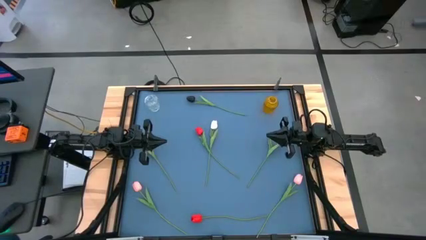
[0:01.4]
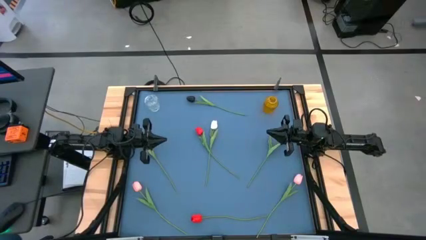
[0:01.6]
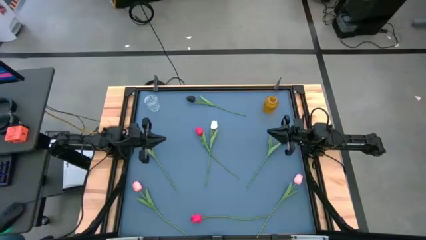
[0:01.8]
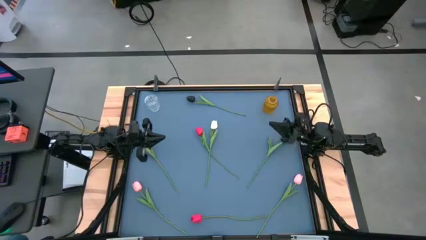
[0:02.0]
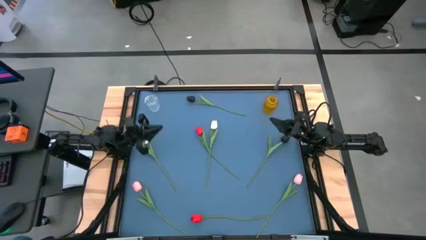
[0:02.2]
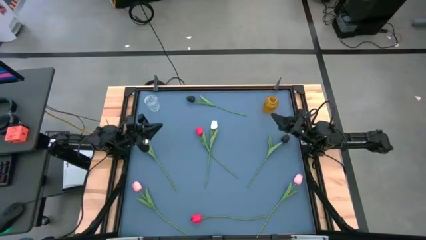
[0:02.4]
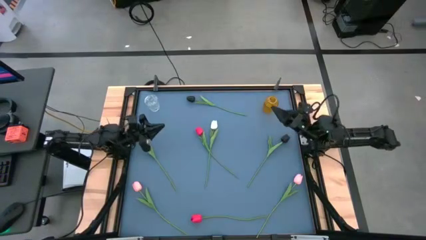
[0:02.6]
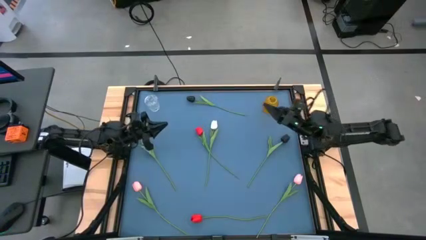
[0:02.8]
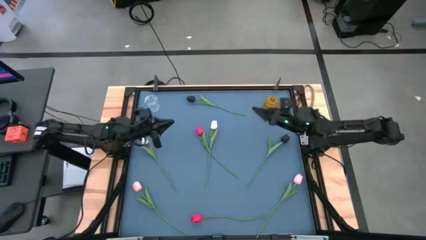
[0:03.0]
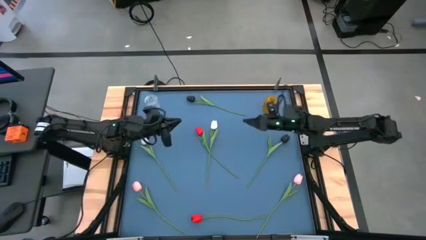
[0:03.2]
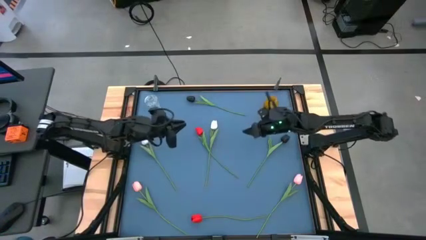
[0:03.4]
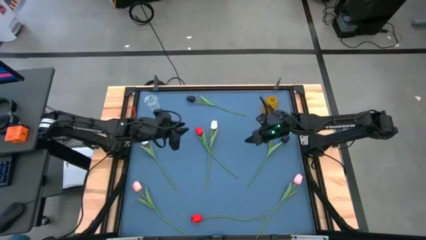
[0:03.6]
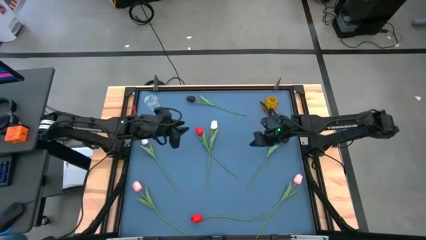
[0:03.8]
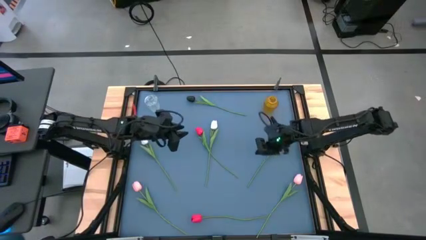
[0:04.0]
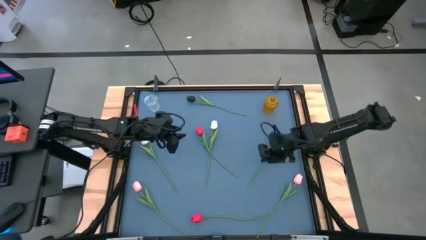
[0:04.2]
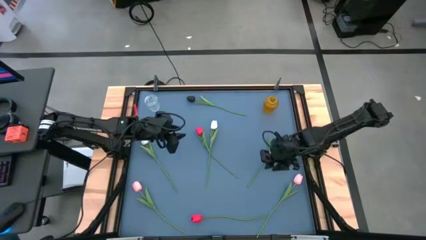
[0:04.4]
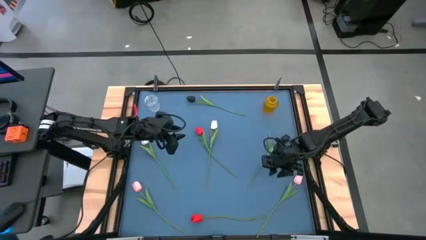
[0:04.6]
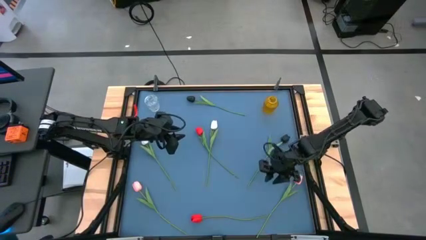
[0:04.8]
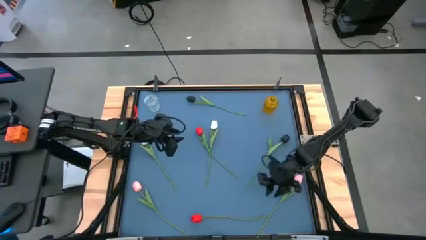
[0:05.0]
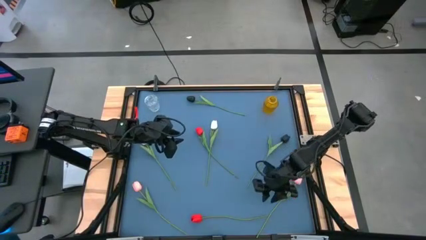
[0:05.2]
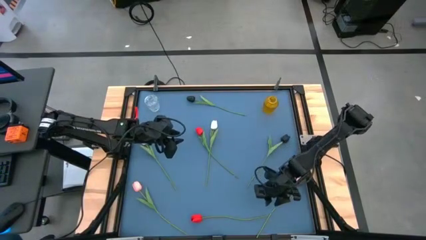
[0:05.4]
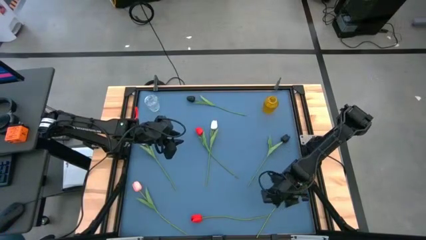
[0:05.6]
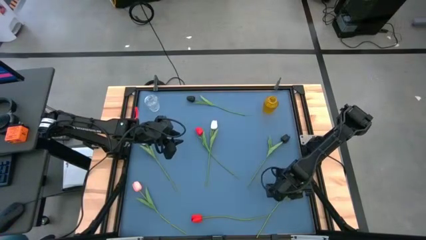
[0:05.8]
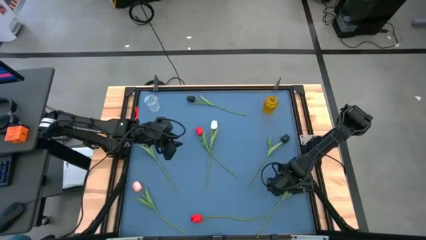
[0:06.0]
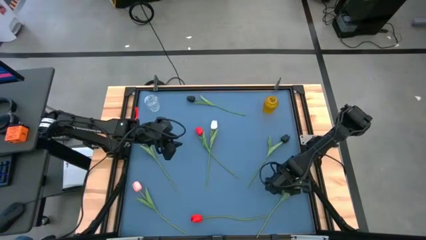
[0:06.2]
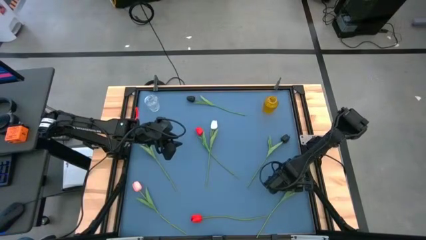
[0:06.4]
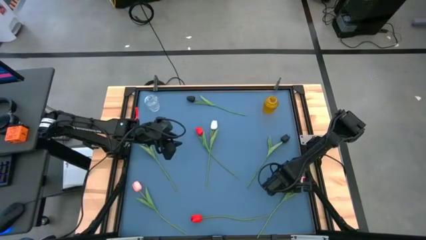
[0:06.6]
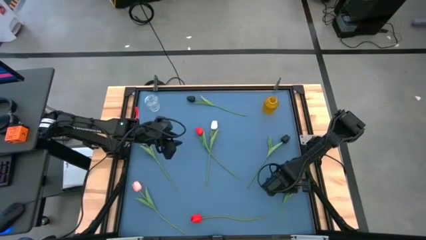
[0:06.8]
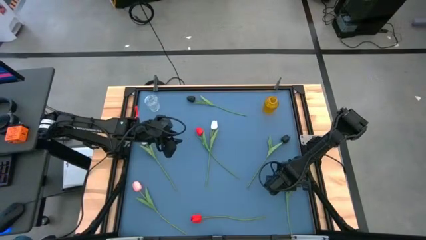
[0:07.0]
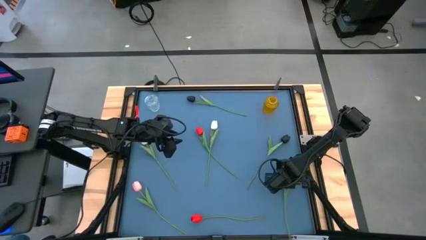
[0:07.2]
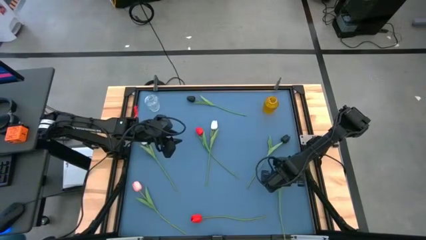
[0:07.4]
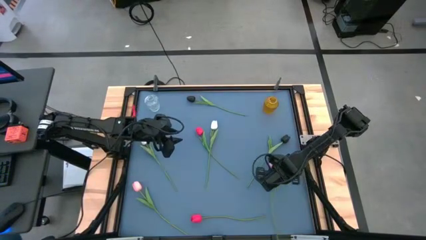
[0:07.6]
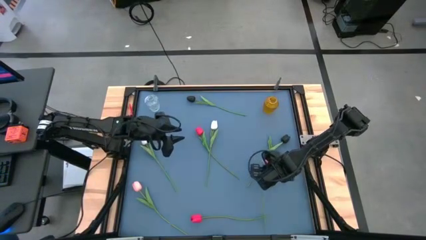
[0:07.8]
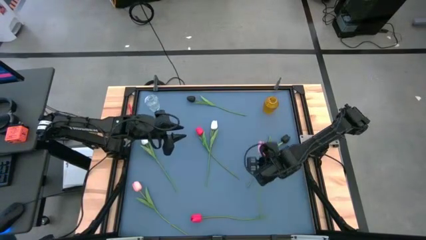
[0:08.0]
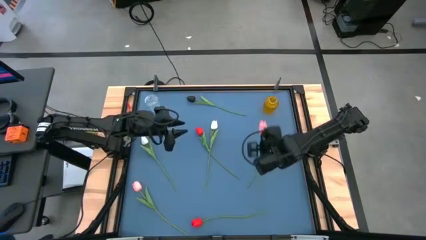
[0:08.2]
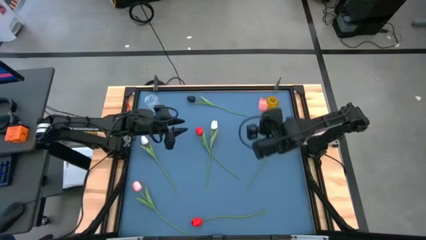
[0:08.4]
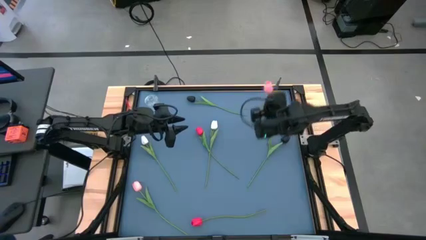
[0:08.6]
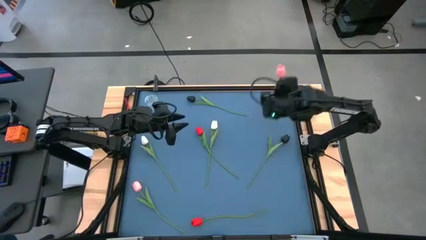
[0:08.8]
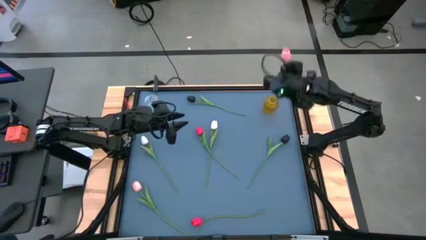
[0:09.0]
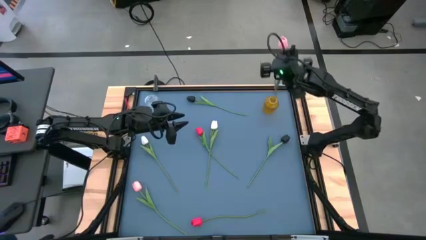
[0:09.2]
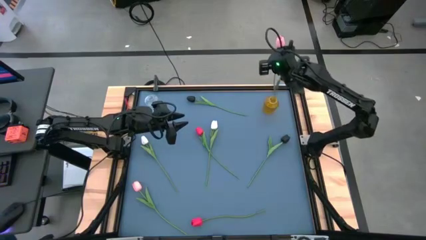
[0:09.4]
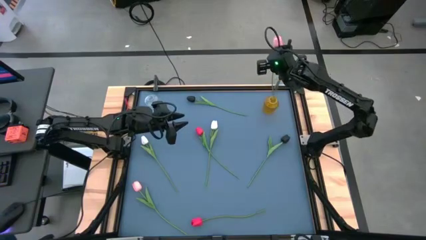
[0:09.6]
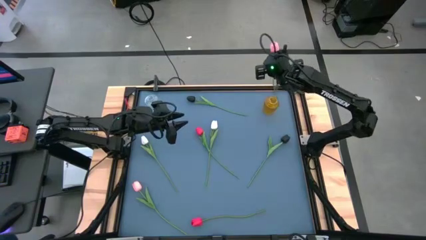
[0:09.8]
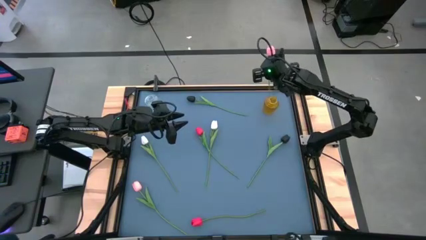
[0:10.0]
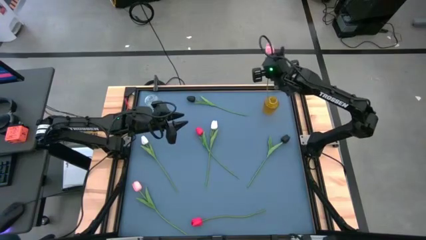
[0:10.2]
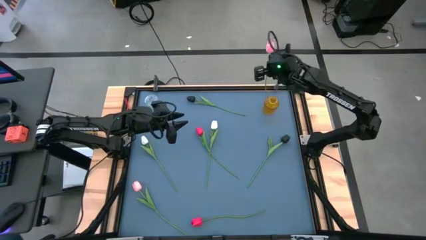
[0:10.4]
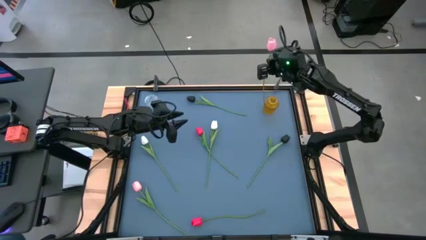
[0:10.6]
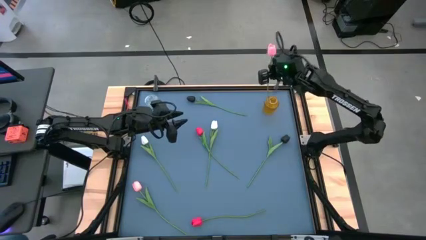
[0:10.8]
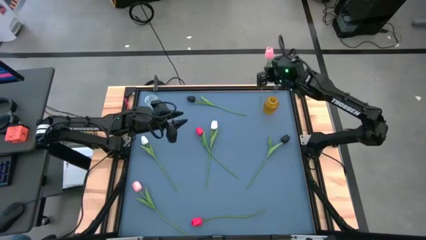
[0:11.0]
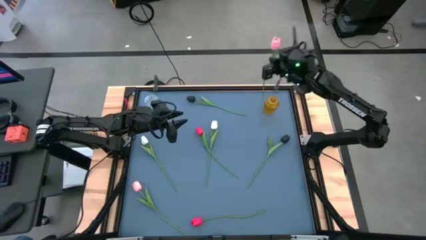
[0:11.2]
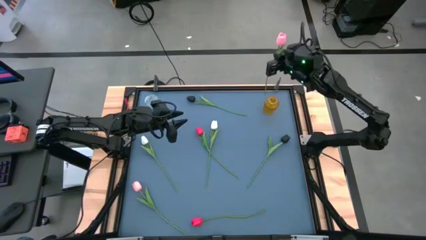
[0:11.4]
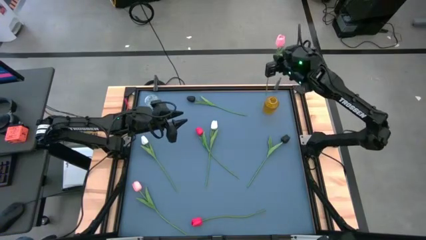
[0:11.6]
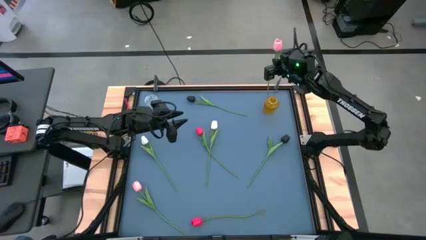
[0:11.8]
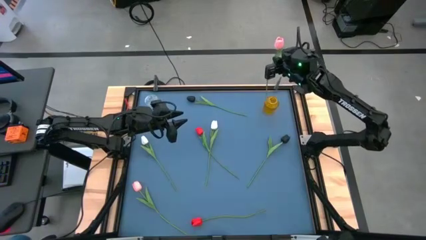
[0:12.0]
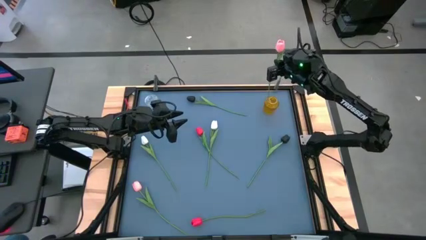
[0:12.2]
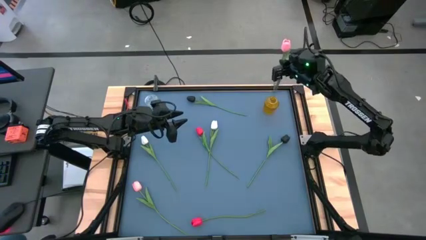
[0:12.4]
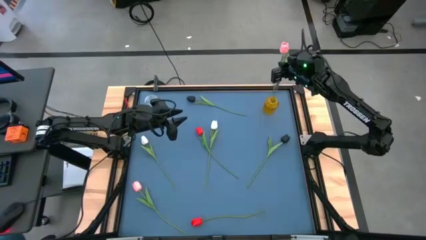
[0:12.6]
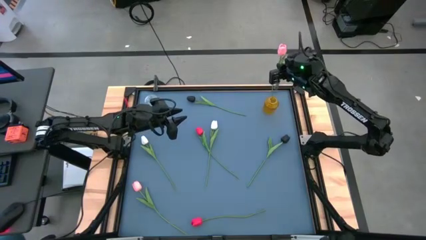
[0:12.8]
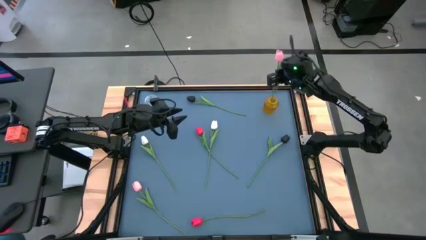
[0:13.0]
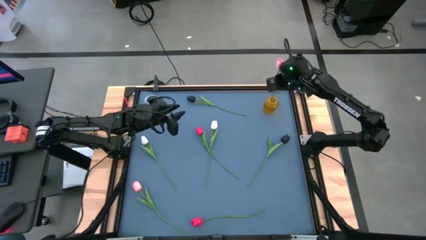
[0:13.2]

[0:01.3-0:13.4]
Task: Sort flowers into vase by color
Put the right pink flower into the yellow vase
